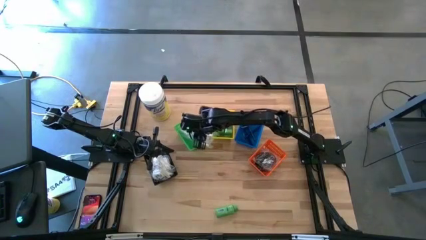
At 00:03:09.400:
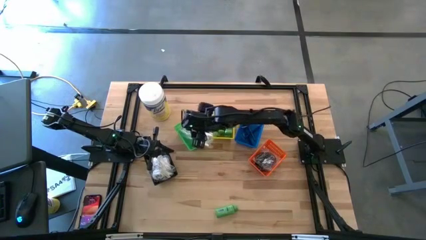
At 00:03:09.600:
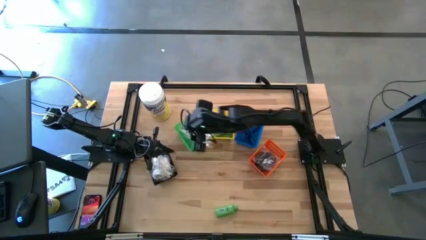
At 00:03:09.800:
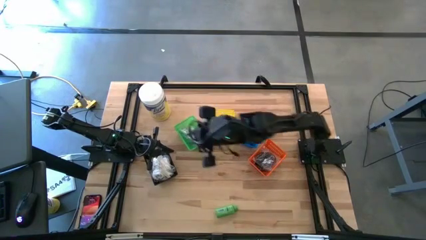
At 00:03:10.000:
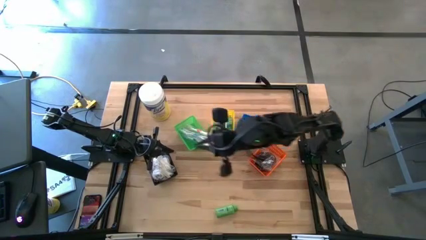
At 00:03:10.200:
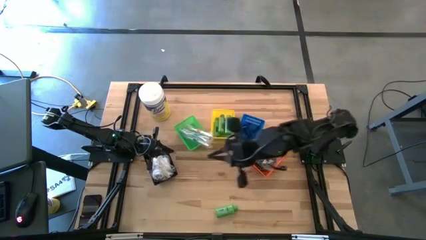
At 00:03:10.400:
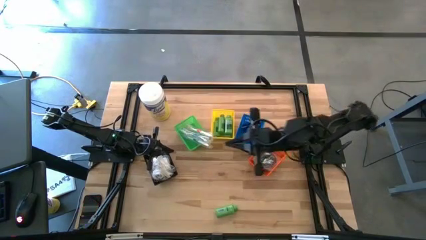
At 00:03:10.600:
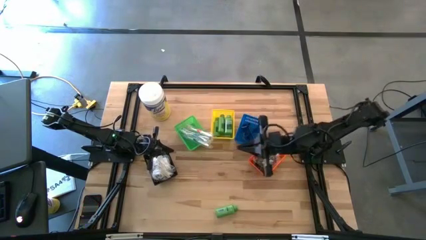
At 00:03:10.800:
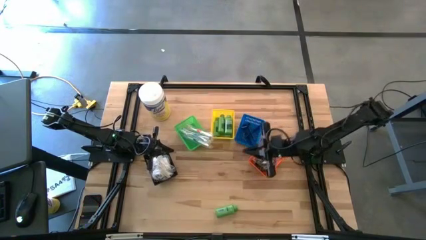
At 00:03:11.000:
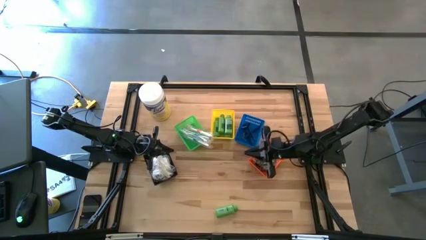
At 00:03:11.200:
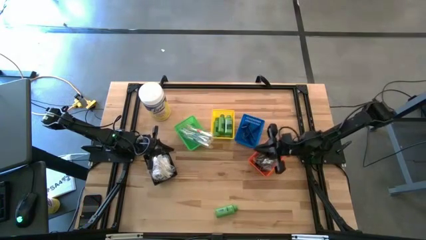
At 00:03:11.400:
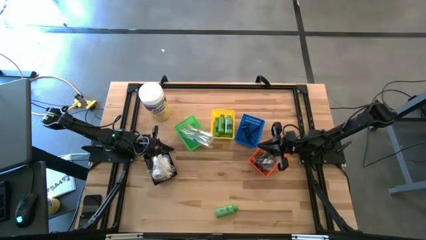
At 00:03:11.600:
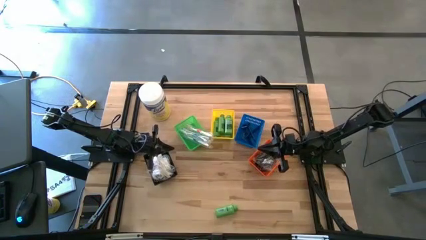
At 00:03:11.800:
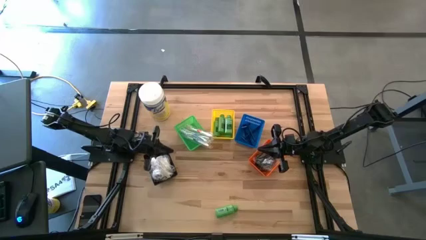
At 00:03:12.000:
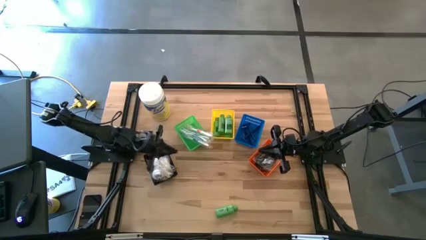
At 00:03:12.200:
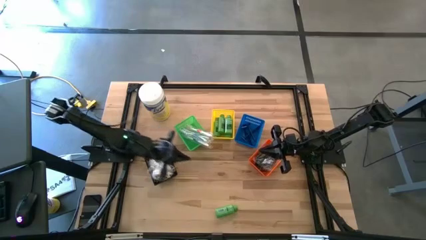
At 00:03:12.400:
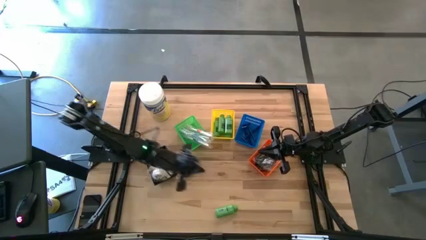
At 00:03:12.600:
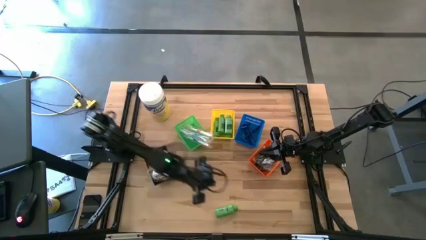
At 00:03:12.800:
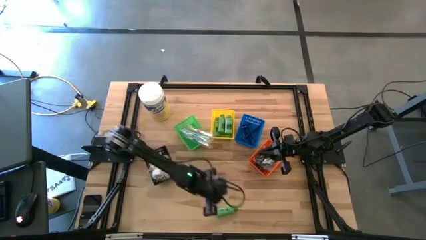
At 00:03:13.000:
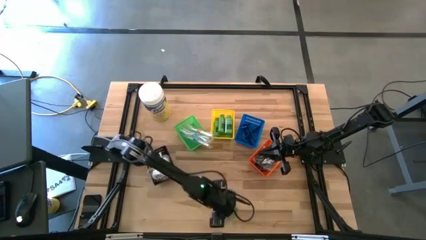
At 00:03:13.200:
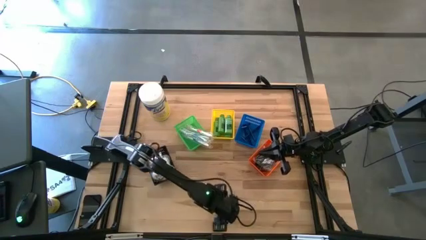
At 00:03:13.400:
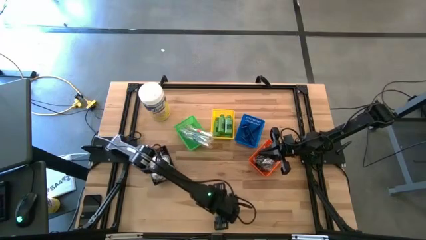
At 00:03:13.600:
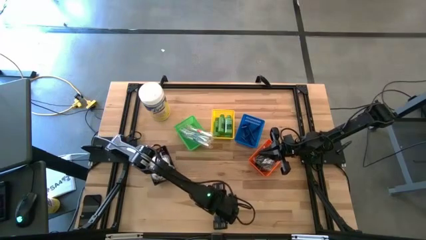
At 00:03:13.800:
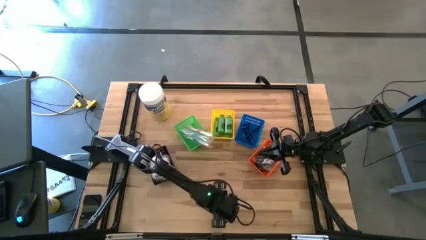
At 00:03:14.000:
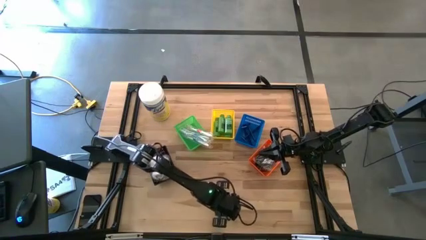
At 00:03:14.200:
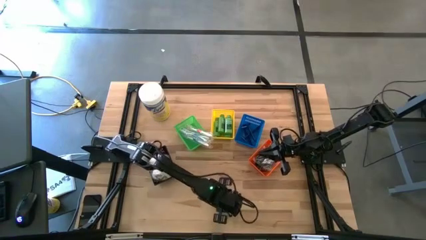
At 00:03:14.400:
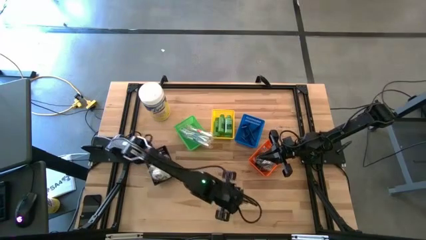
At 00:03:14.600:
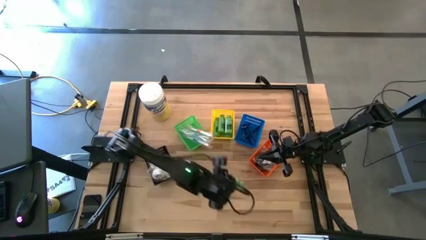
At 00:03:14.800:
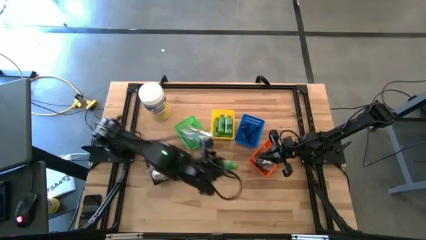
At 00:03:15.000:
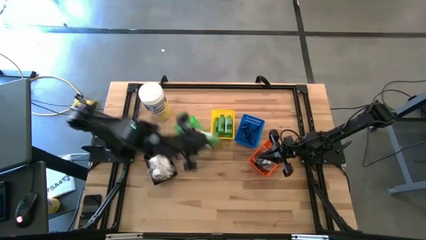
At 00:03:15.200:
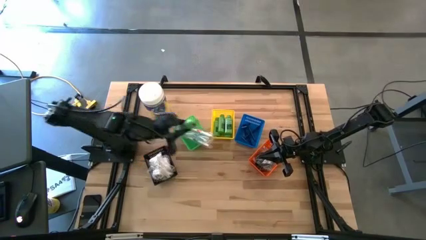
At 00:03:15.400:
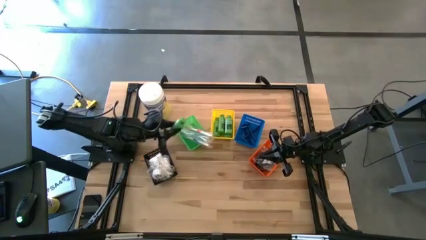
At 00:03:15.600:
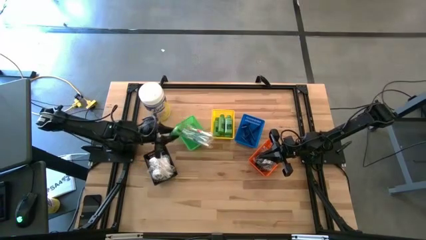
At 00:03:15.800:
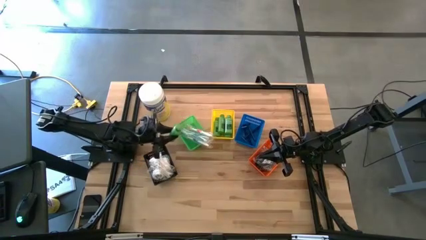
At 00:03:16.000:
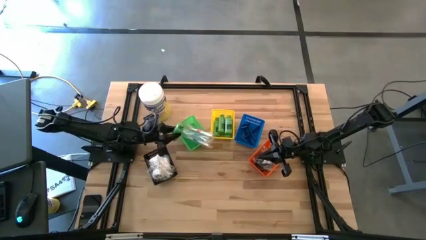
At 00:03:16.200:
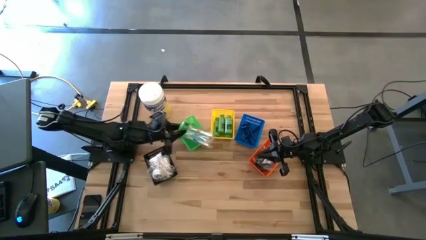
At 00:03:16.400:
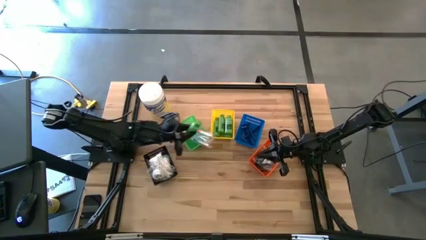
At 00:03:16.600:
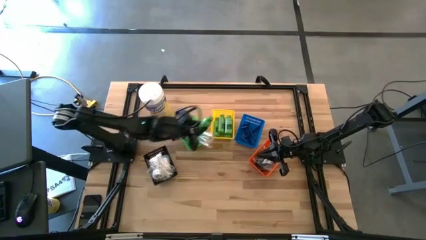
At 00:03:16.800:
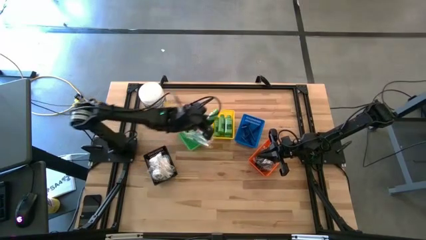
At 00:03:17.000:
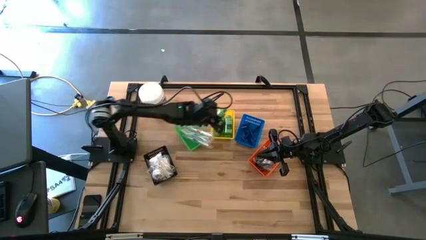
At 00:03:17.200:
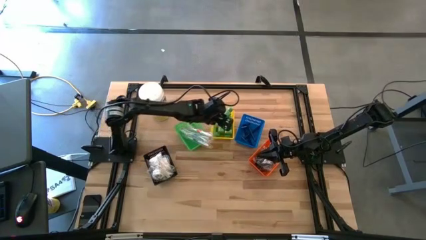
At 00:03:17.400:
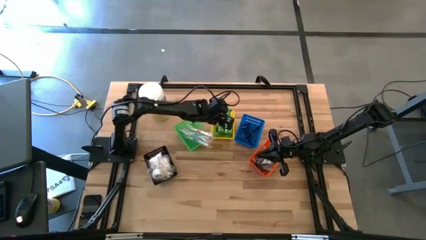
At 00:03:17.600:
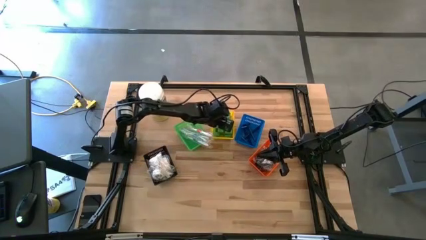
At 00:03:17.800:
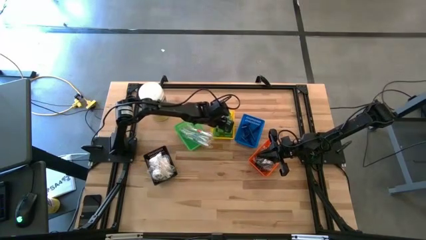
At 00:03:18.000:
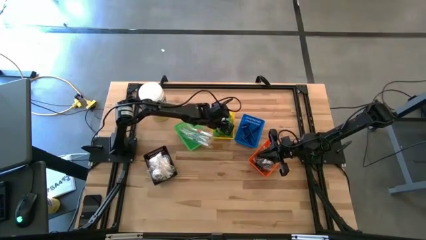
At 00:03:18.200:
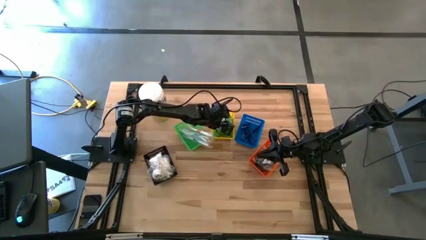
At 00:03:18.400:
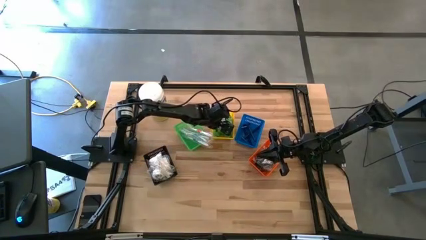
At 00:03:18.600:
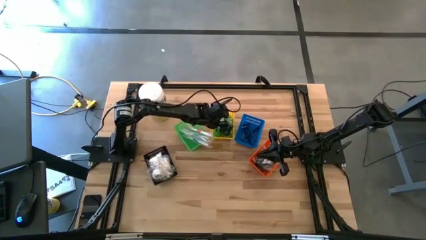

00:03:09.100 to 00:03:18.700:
Task: Pick & Place Travel size toiletries
Put the shampoo bottle into the yellow bin

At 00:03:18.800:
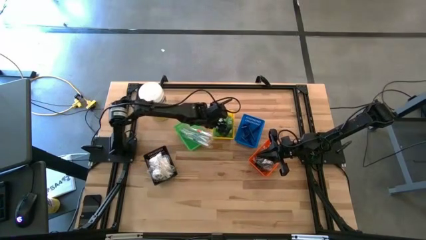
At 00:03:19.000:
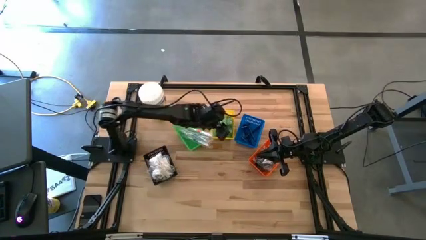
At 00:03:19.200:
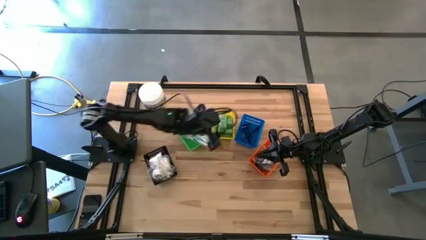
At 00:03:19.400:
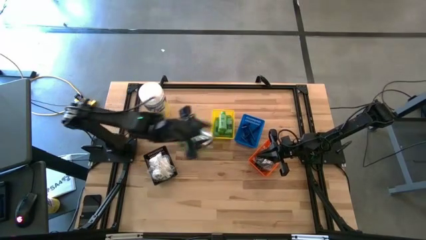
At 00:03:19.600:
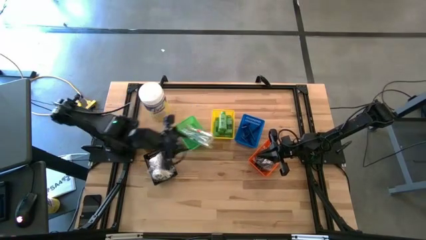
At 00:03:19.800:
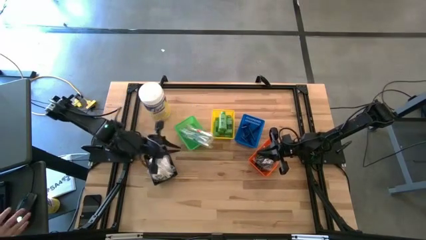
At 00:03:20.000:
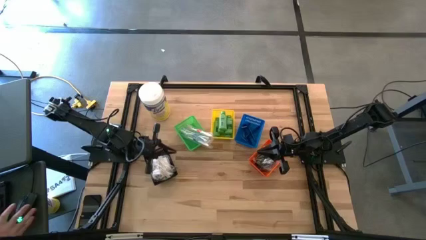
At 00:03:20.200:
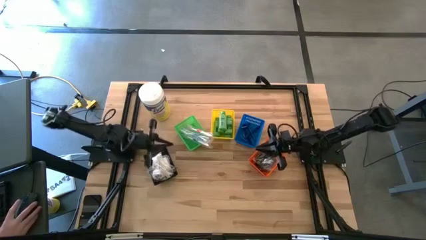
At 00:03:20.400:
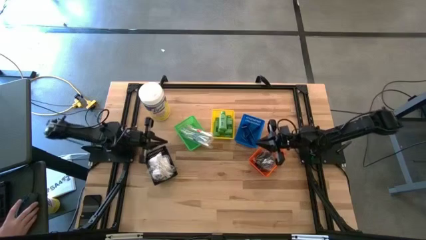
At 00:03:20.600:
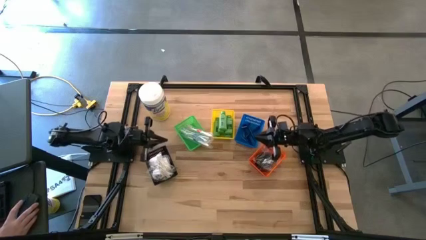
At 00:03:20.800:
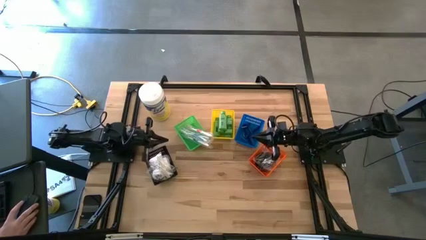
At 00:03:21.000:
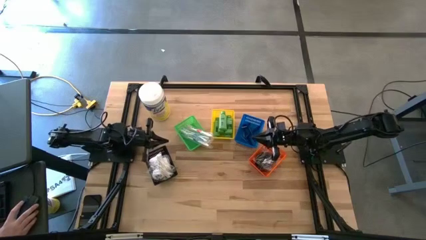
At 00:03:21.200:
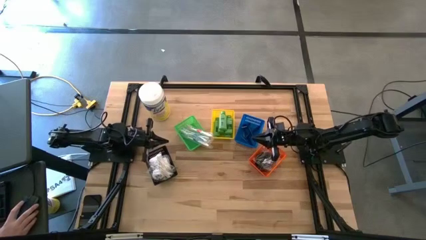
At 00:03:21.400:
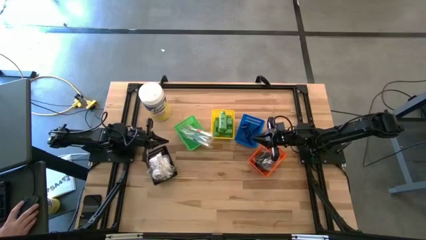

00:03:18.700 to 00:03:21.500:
Return to Home Position
